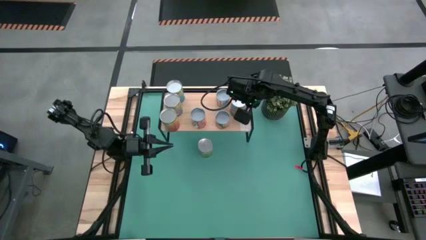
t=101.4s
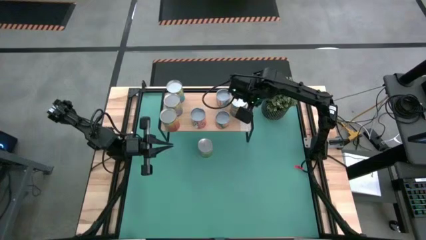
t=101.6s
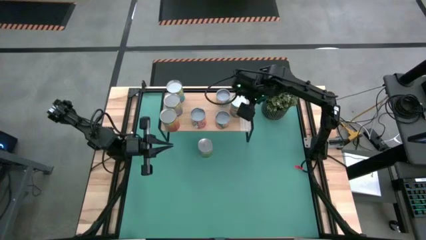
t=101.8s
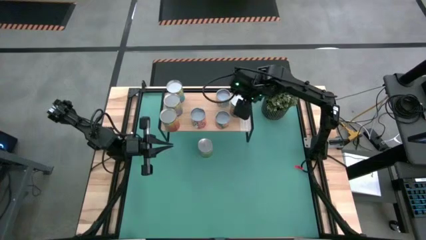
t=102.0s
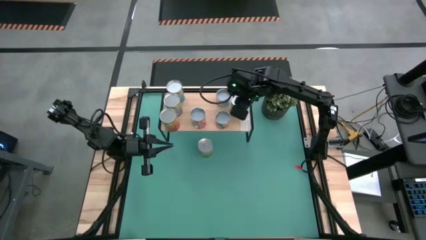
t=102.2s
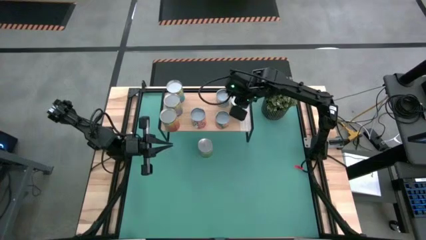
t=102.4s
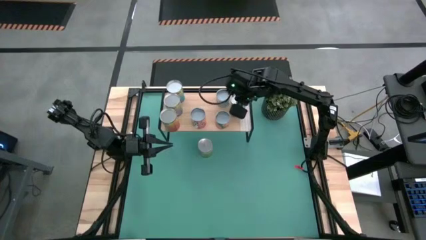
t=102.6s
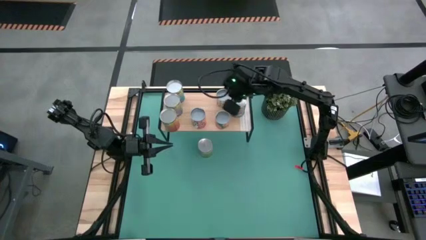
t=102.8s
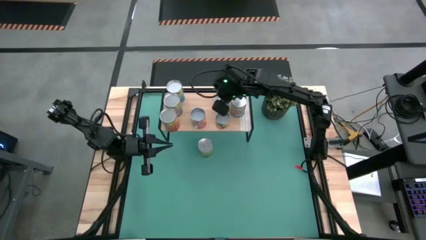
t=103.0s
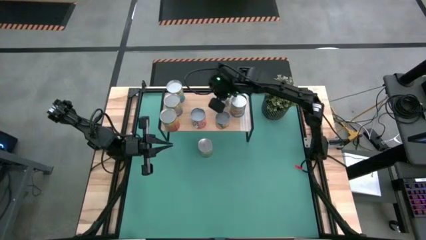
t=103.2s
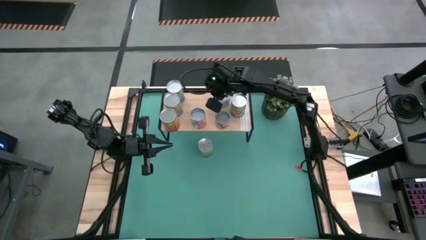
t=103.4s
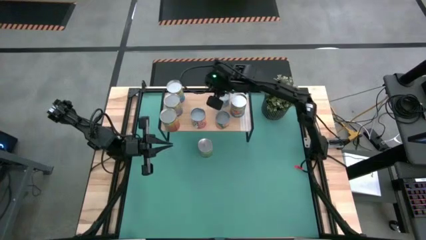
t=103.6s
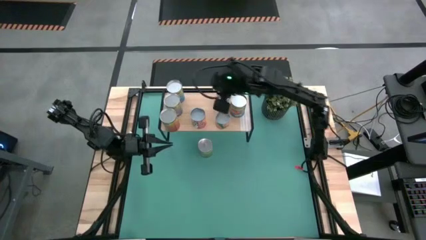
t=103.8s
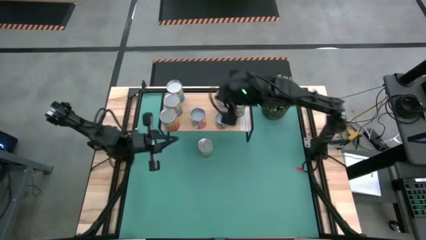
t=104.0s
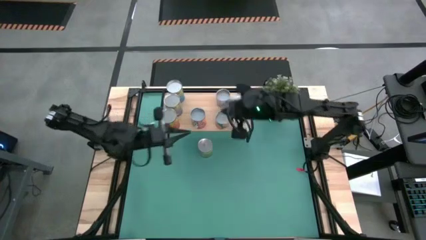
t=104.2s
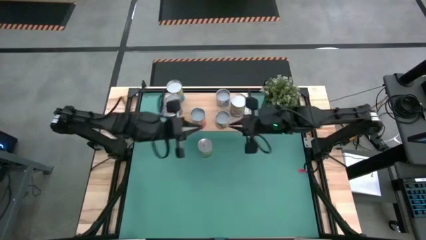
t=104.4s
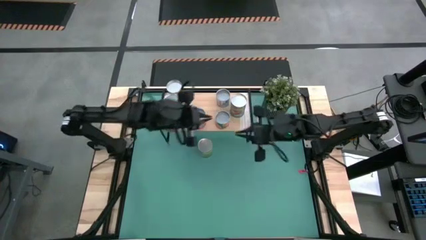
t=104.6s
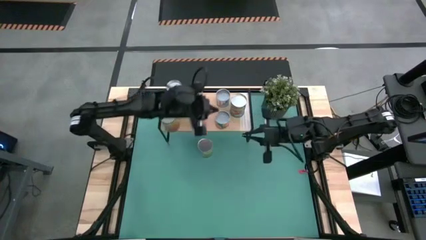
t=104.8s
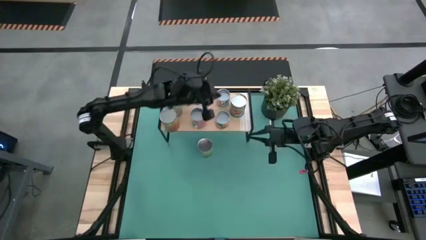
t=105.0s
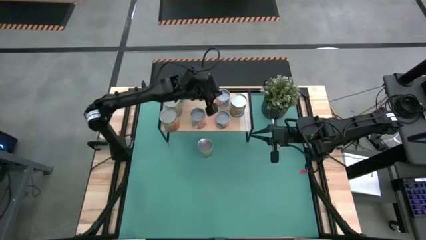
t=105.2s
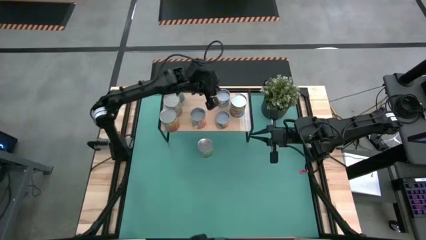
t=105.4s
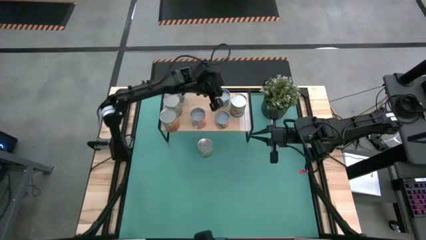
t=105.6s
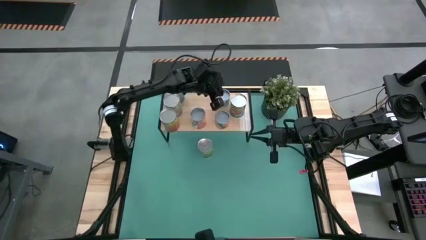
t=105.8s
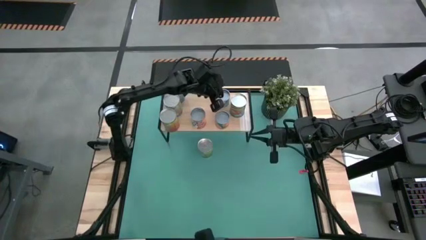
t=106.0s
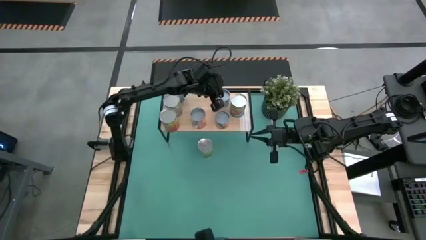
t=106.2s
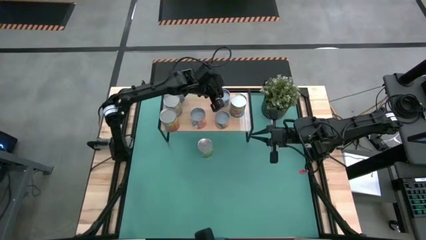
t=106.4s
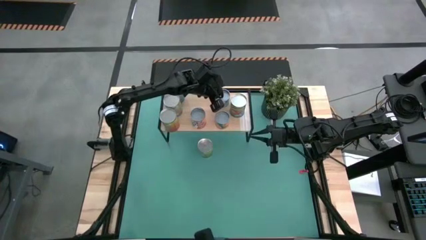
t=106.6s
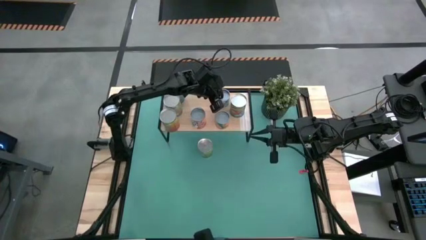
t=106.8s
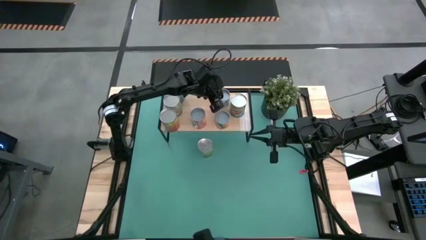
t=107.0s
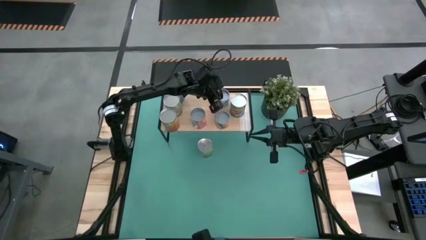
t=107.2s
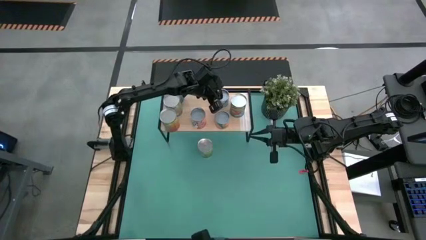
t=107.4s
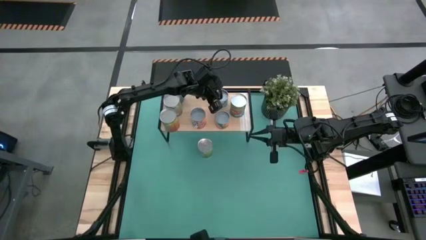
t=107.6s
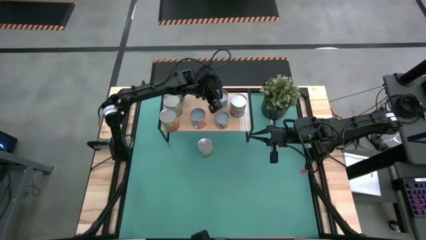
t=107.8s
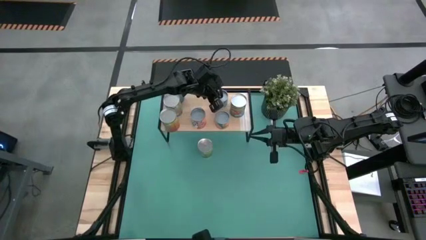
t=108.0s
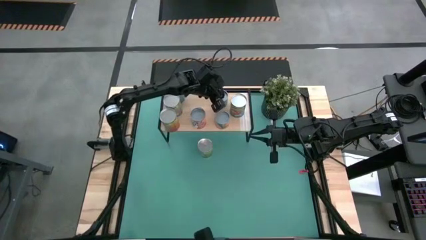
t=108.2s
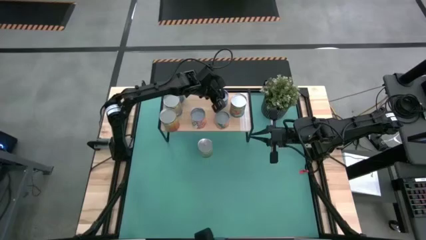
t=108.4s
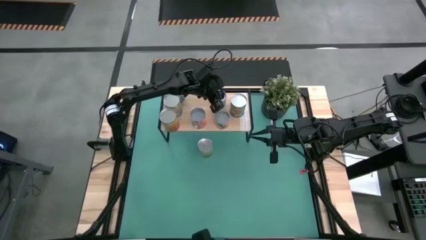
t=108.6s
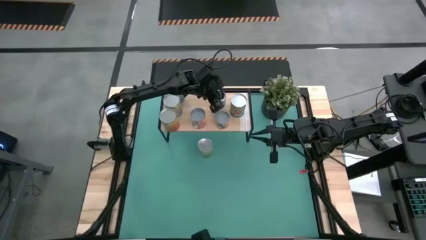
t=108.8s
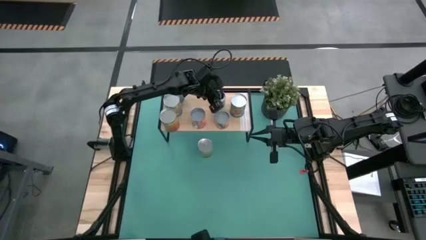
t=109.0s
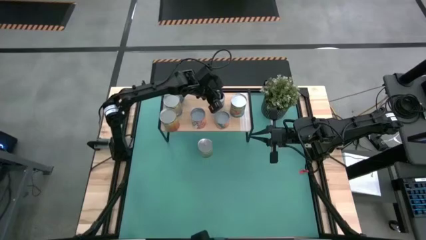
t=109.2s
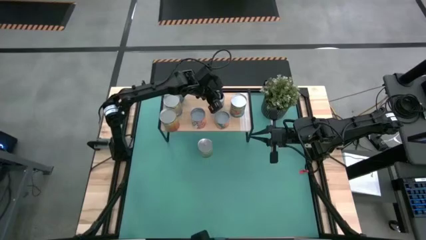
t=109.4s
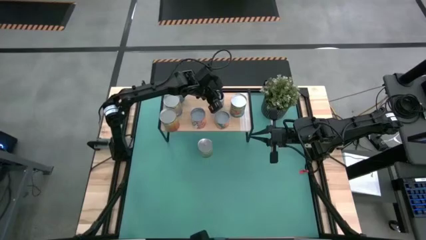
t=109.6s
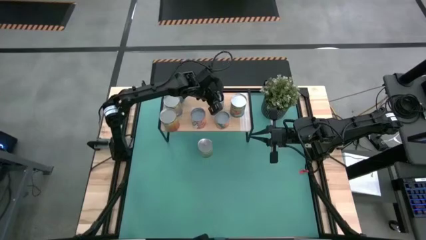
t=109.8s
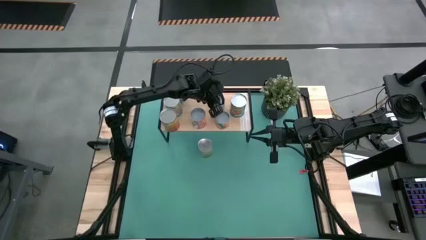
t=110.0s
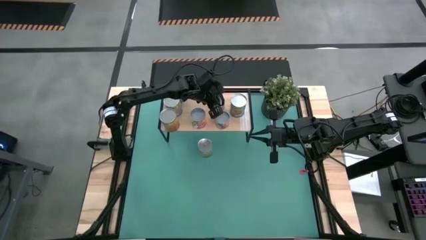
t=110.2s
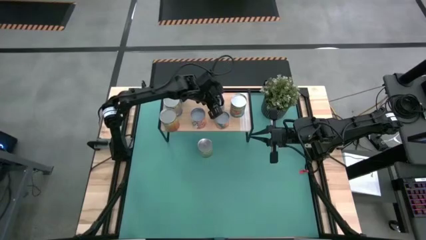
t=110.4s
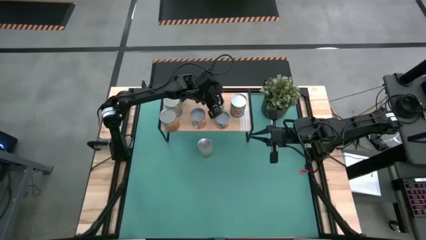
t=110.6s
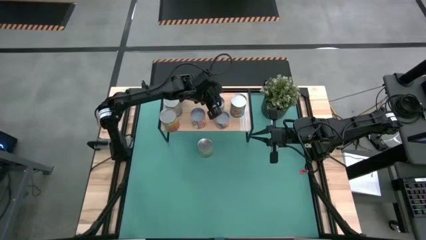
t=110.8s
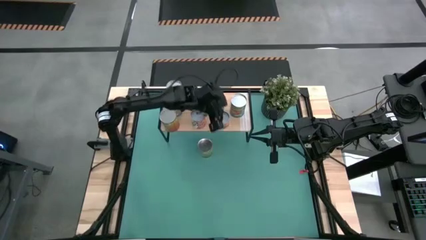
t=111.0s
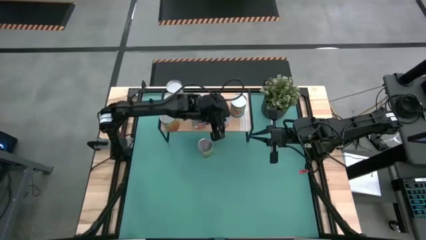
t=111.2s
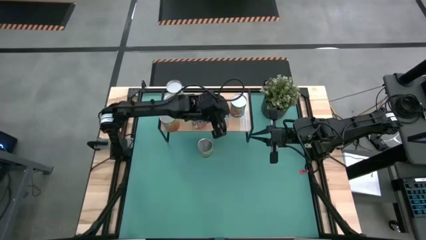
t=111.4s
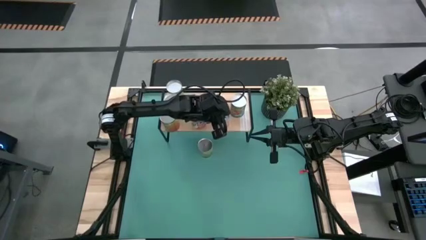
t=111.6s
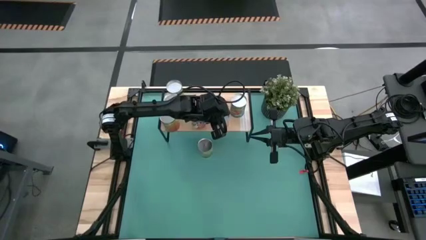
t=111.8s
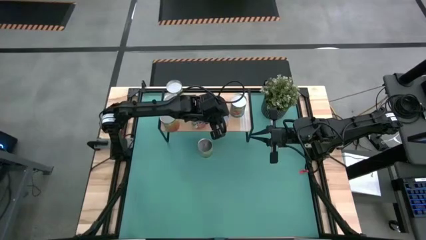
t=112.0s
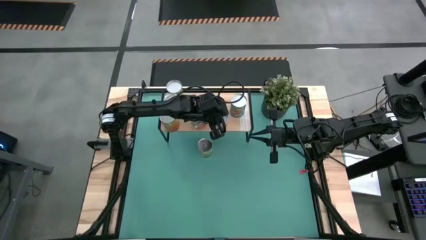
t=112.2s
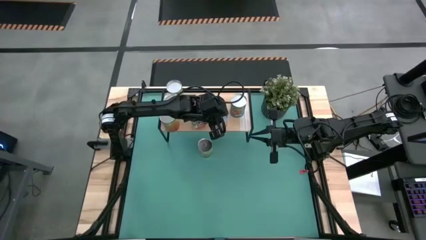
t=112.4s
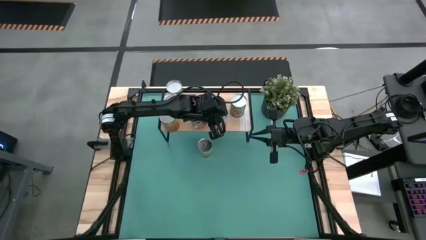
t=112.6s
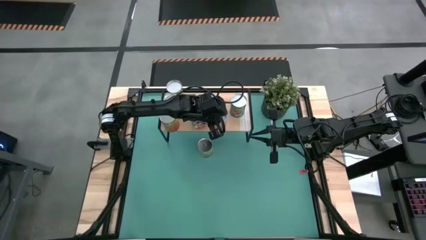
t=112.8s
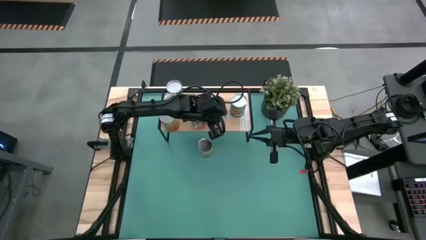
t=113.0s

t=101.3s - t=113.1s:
Task: Pick and place cans onto a shelf
Adjust the canned goods on the shelf

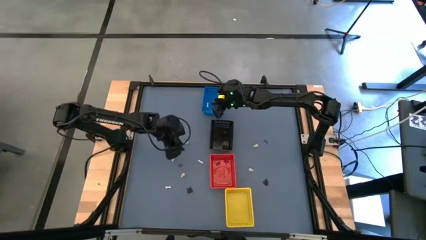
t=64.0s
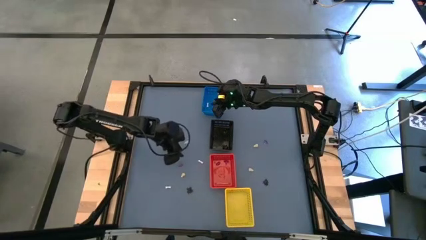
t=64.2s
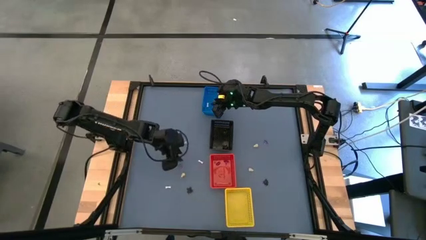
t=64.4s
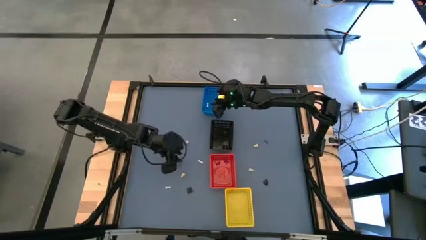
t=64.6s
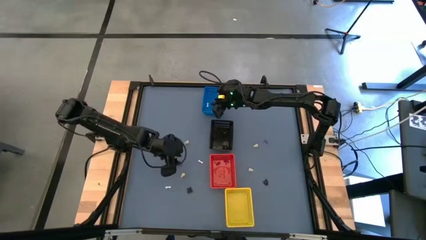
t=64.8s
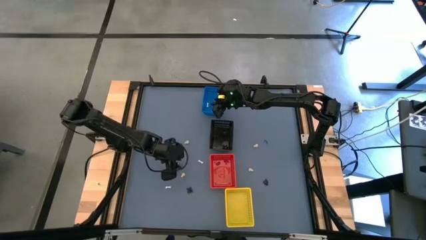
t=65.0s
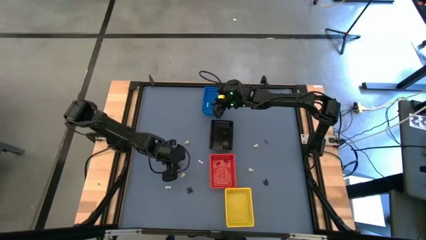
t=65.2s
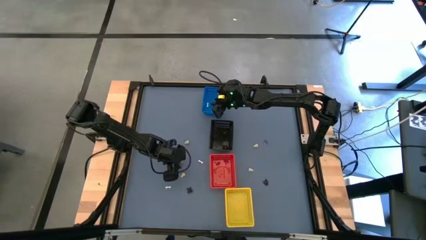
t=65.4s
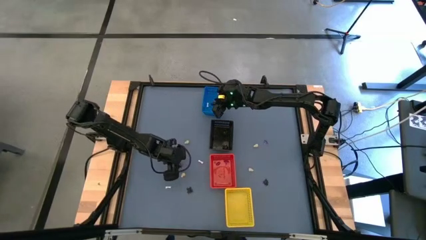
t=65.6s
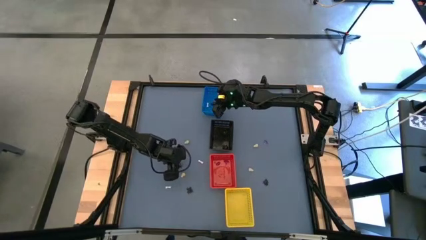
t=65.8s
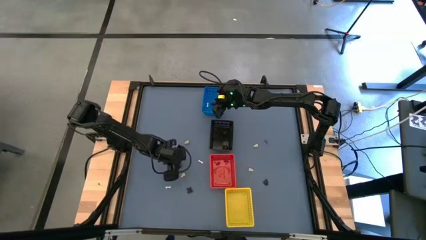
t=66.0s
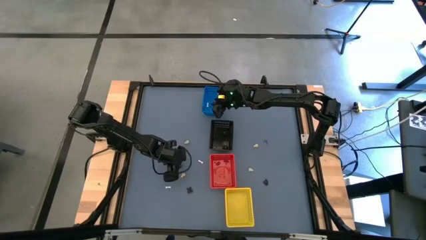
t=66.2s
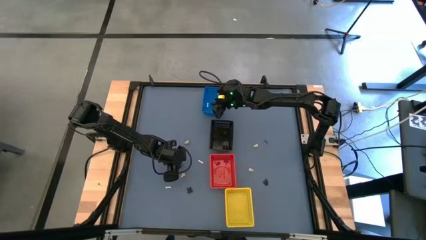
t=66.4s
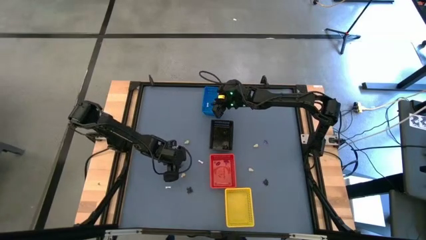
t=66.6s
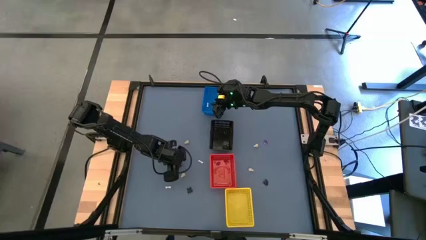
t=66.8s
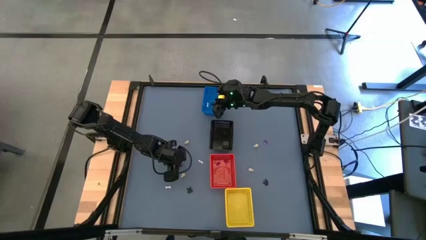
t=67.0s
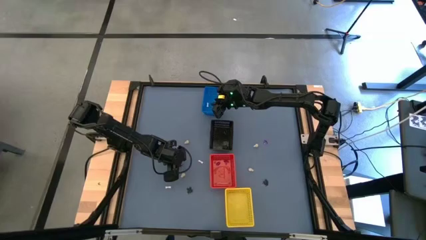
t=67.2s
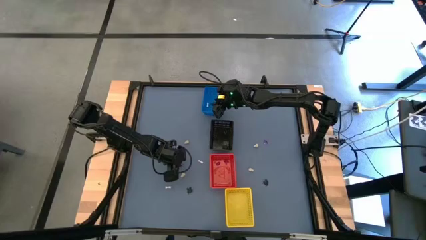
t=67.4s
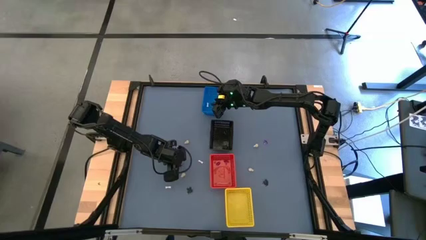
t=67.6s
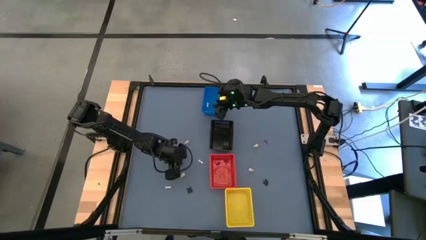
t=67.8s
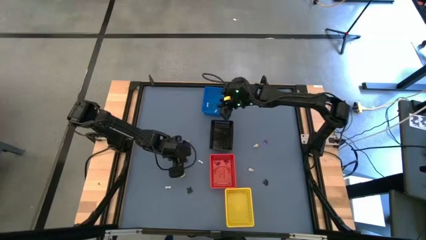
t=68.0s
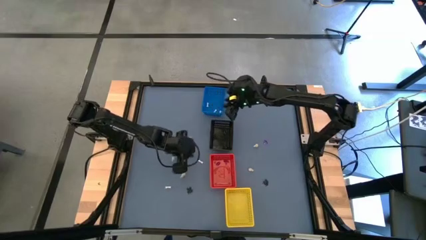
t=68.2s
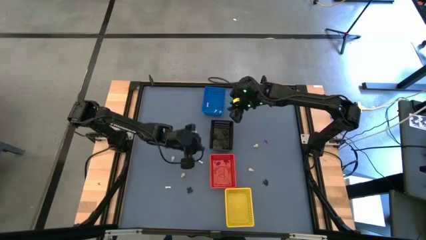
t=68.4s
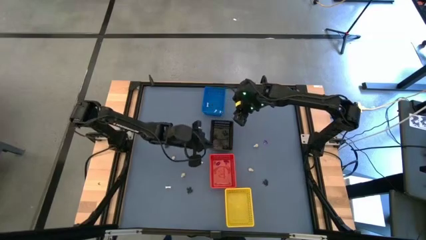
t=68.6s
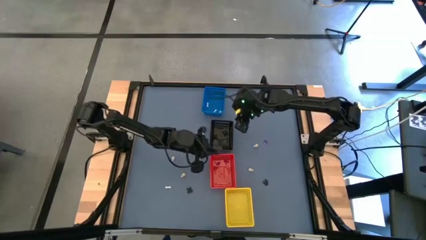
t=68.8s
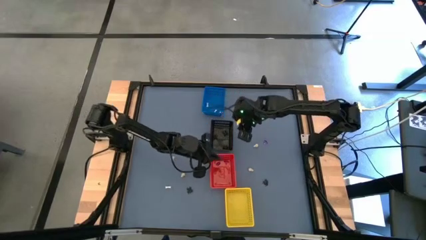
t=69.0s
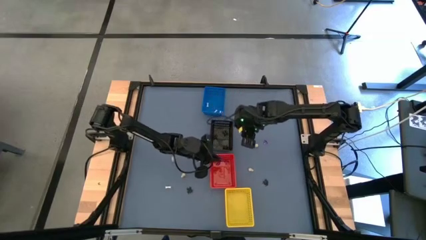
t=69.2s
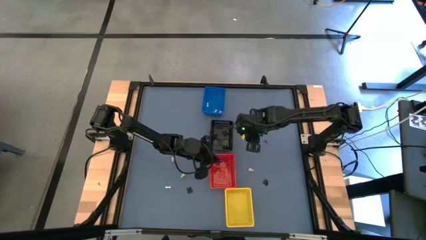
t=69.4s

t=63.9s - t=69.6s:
Task: Sort Halloween decoration
Put the violet witch hat toy into the red bin
